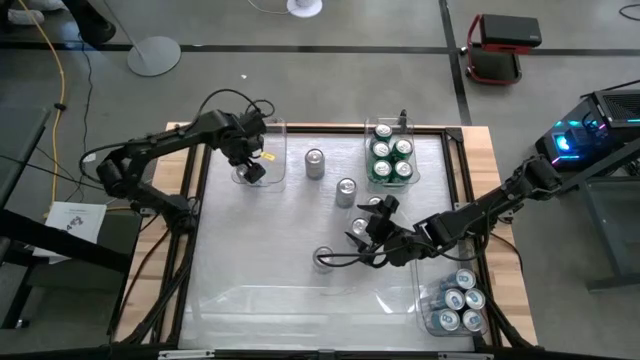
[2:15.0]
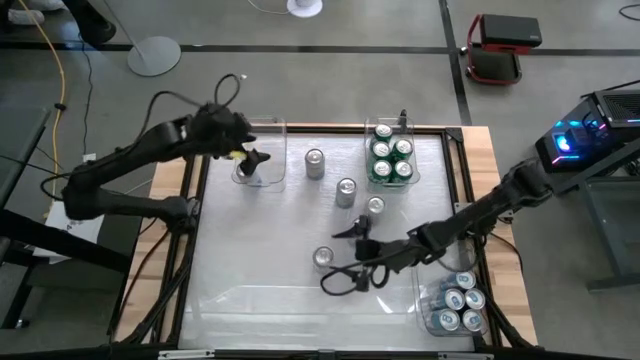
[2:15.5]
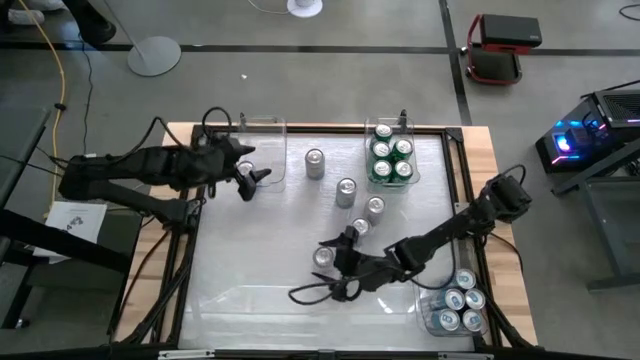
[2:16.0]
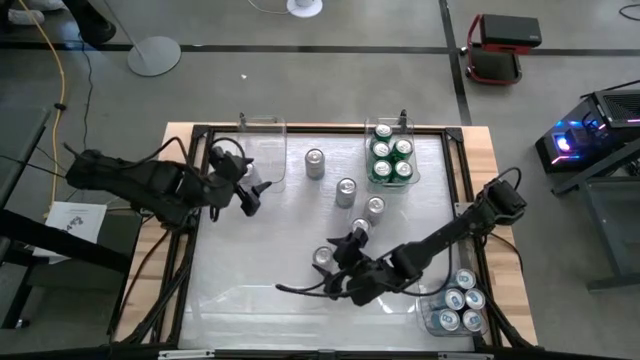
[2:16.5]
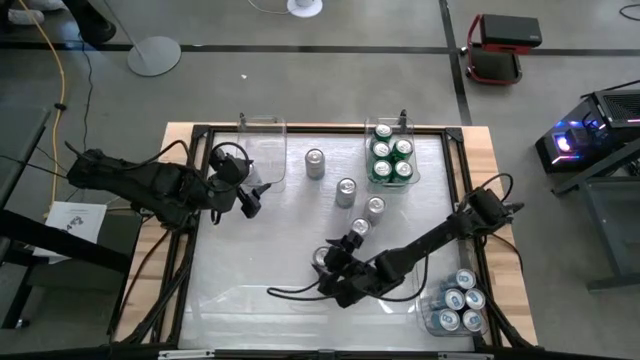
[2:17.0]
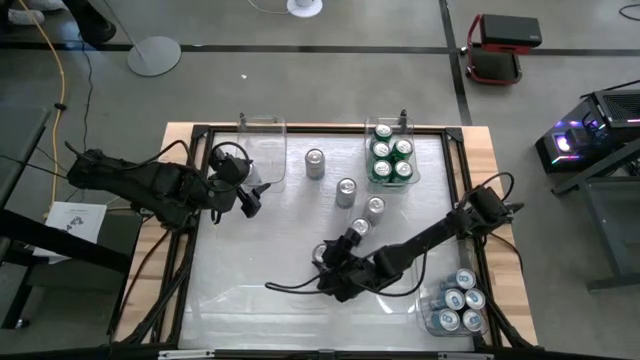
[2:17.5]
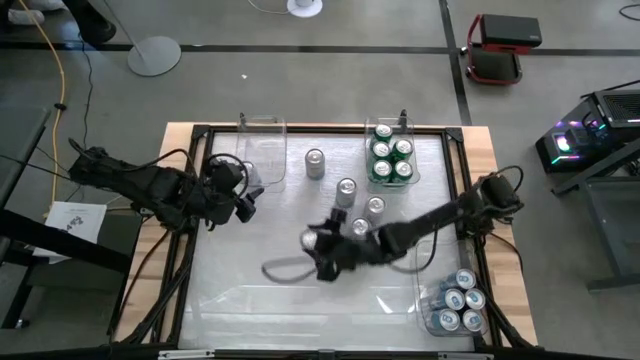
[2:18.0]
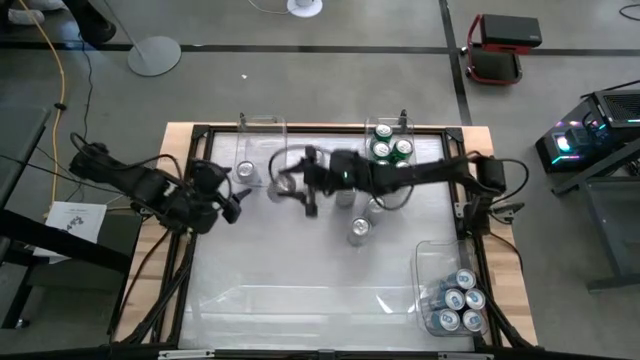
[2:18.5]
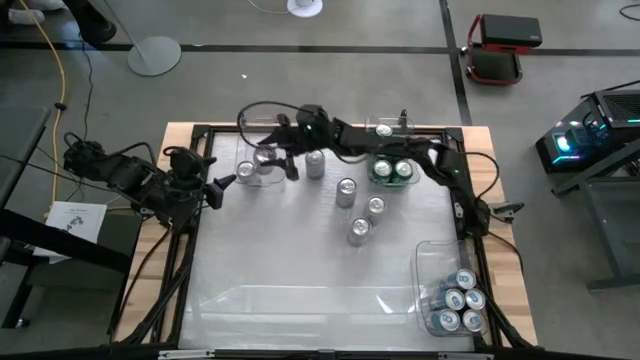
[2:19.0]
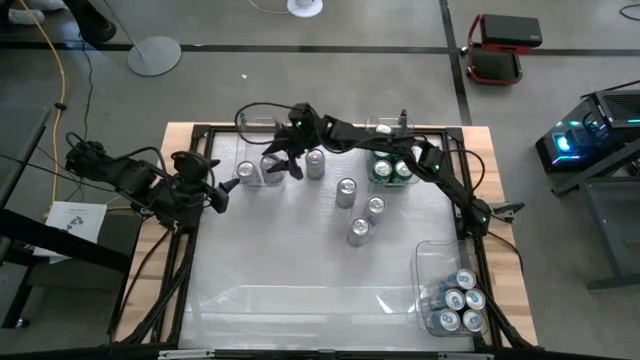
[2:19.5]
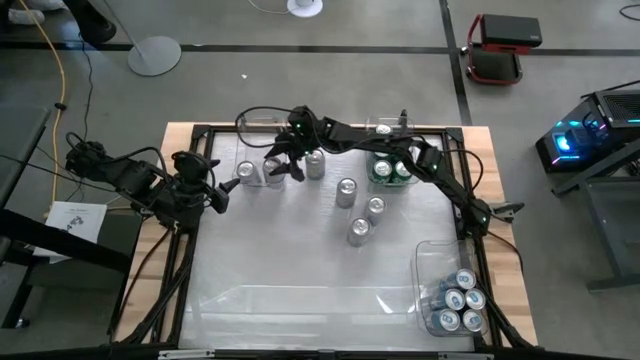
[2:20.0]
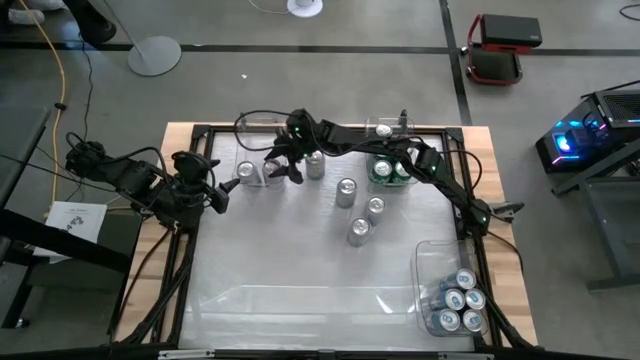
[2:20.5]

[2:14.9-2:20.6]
Task: Sort soda cans
Put the blue-white soda can into the top left transparent bin

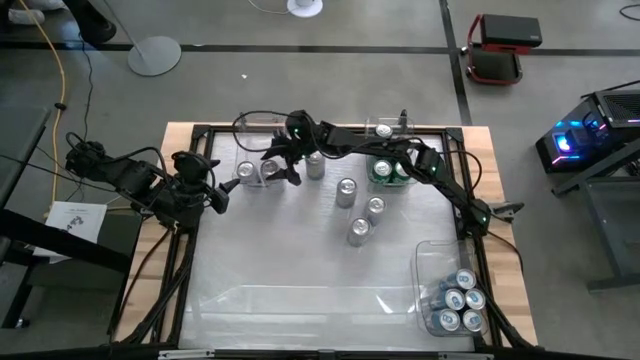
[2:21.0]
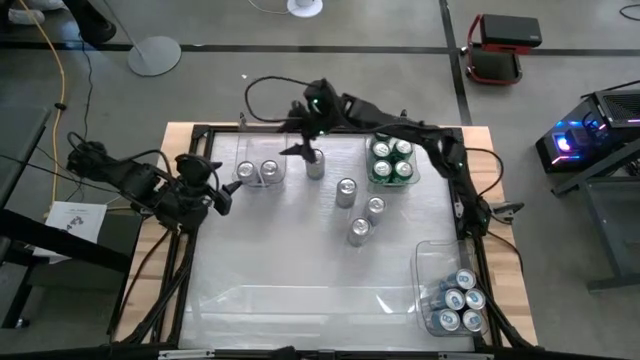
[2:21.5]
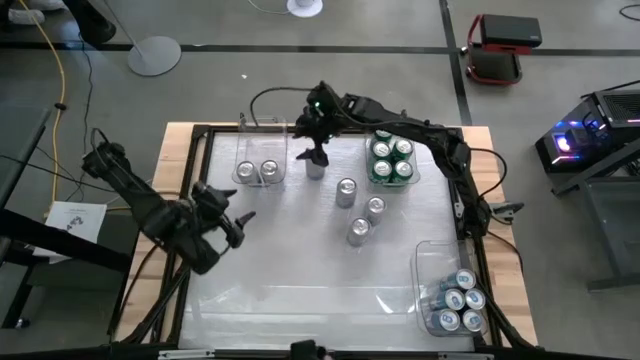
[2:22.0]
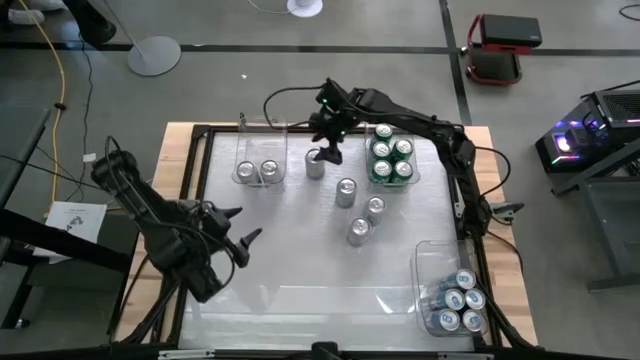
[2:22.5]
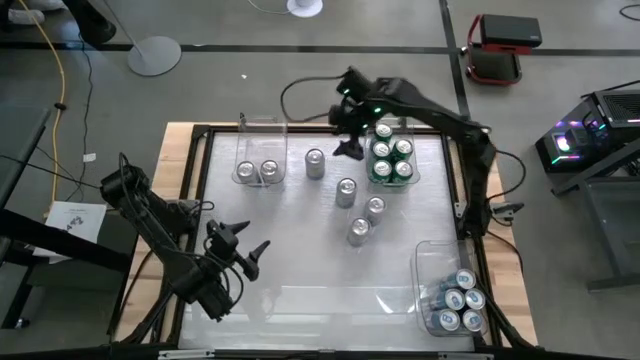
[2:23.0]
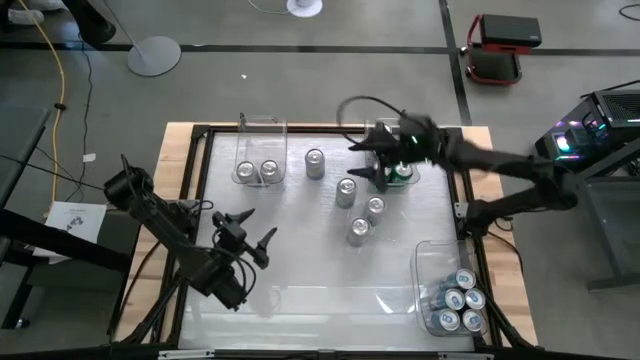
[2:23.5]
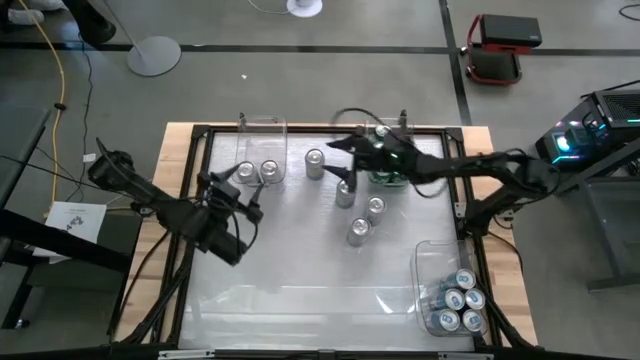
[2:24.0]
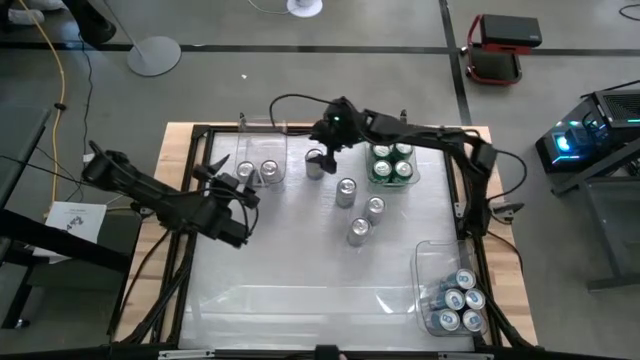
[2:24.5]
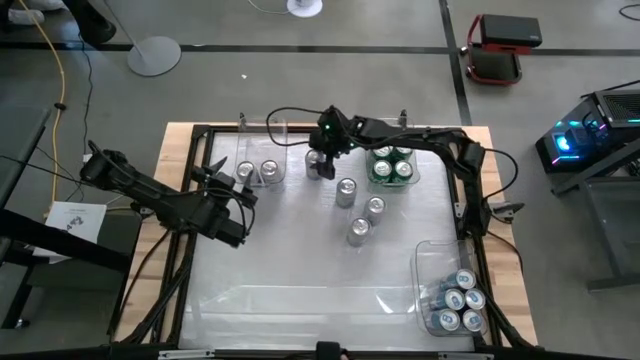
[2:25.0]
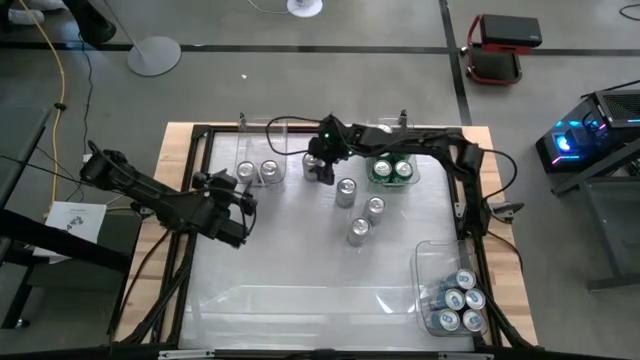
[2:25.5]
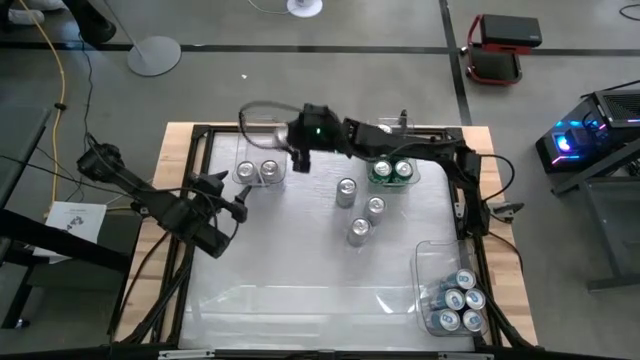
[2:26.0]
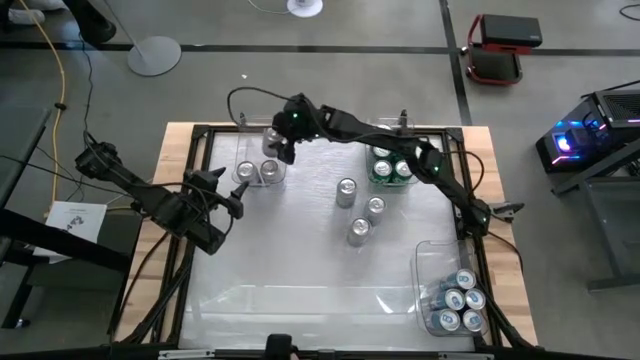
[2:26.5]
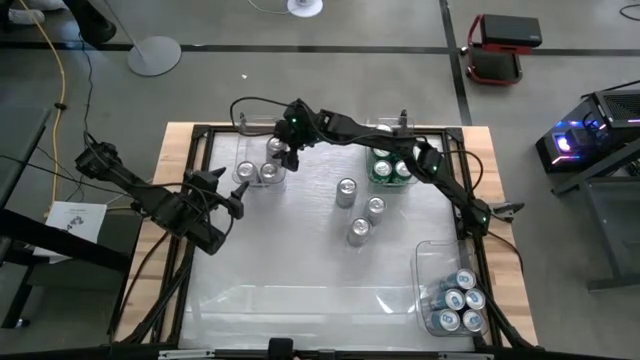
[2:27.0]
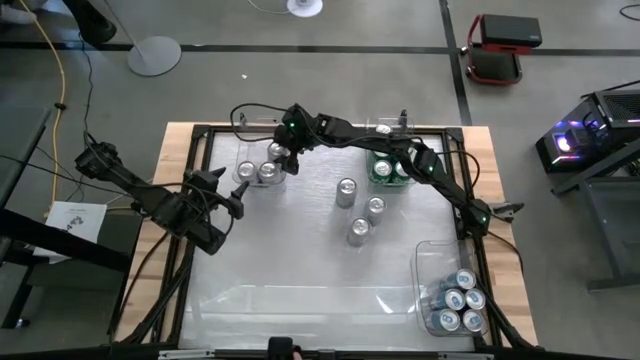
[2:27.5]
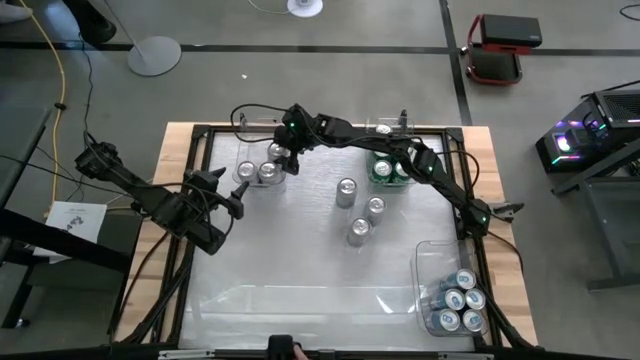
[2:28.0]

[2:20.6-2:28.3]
Put the blue-white soda can into the top left transparent bin

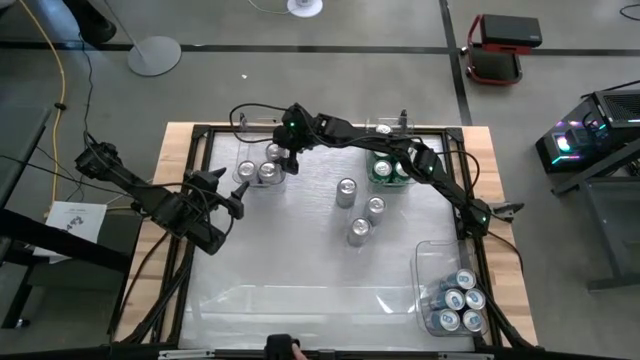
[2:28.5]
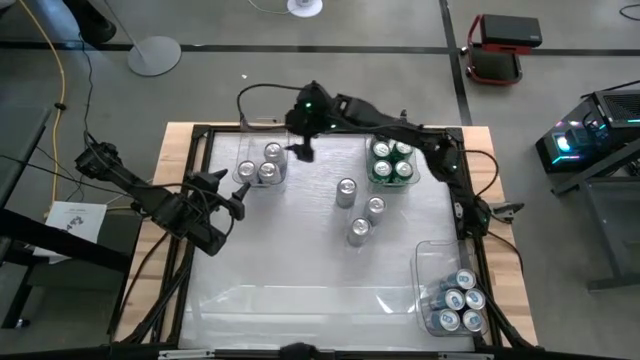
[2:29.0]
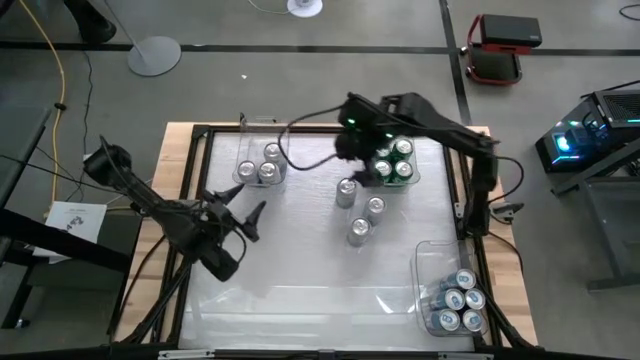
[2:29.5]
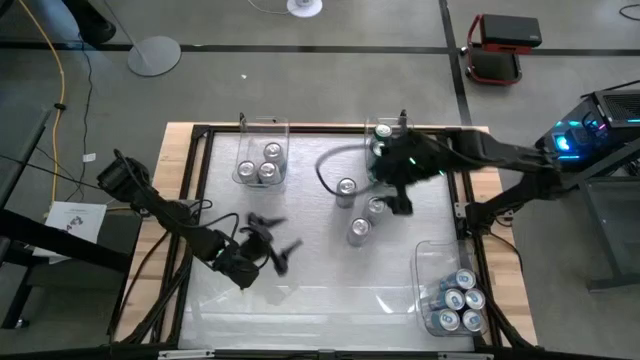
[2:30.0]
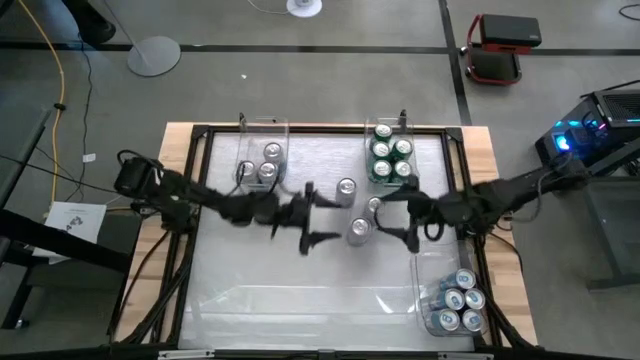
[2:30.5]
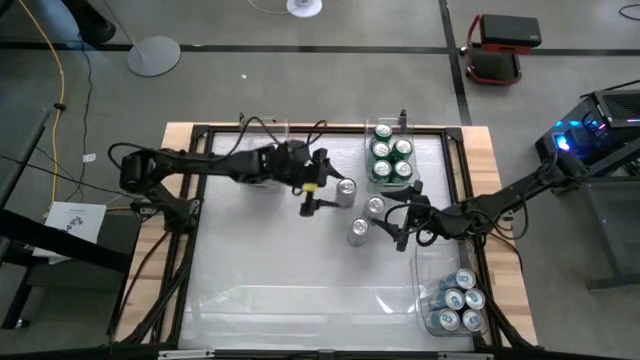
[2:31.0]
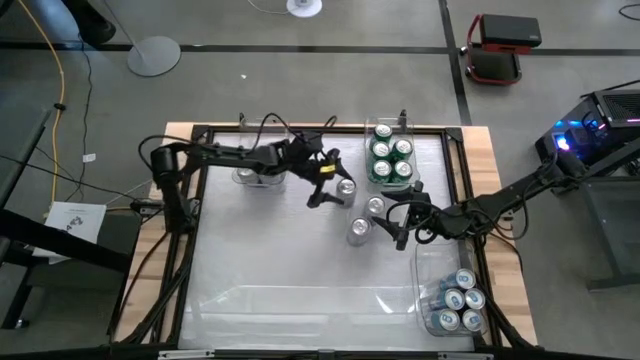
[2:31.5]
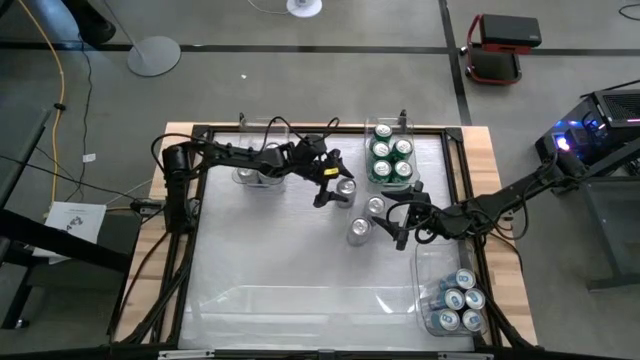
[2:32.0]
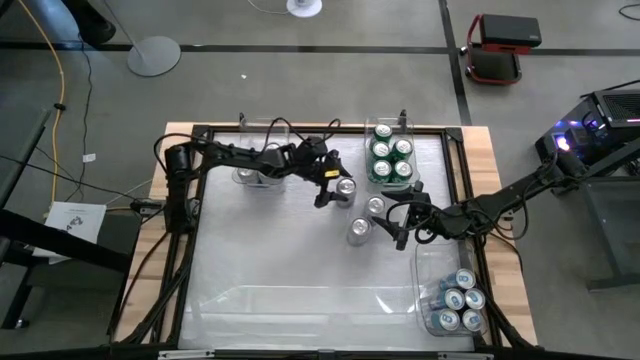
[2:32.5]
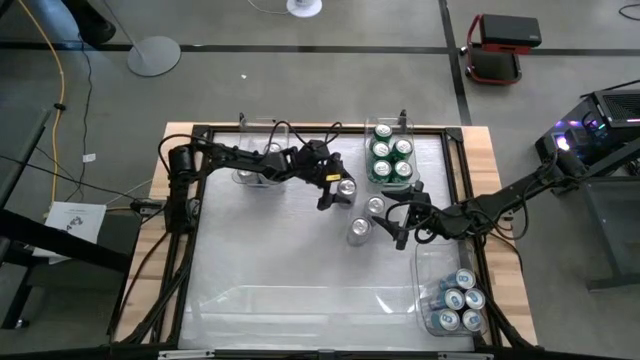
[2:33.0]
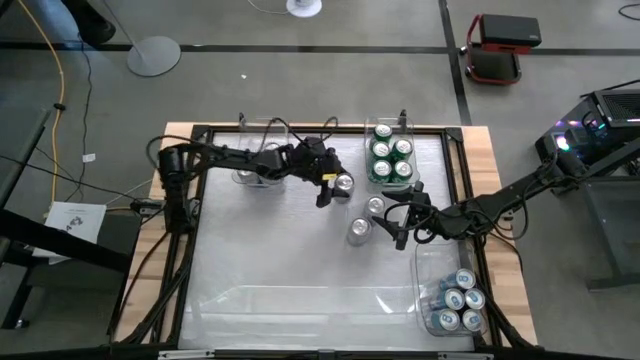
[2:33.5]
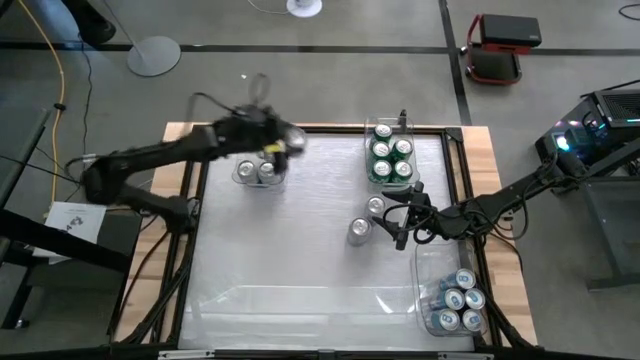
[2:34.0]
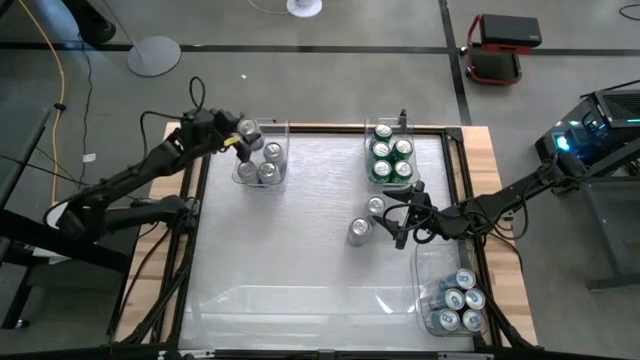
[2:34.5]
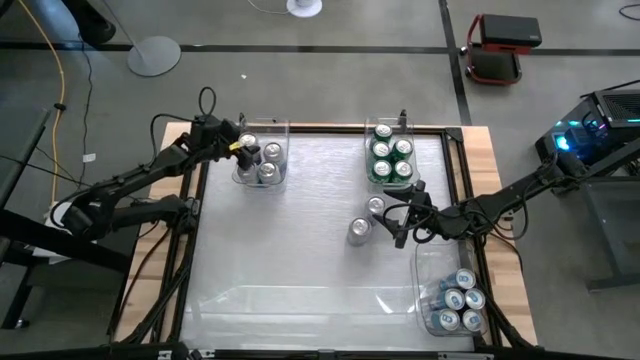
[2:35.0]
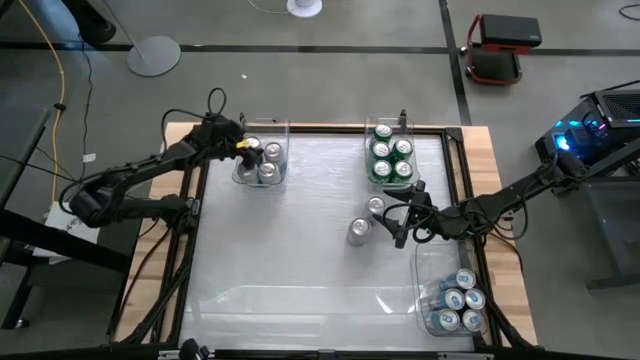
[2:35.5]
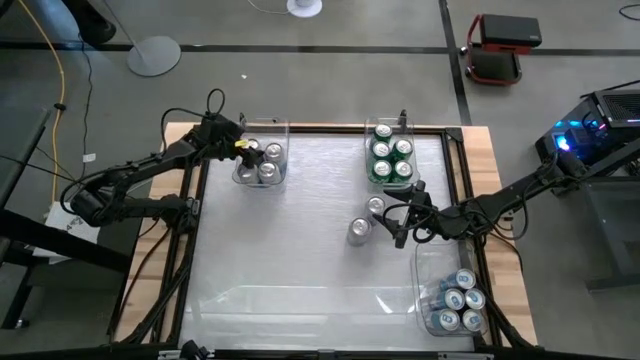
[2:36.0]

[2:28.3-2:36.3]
Put the blue-white soda can into the top left transparent bin
